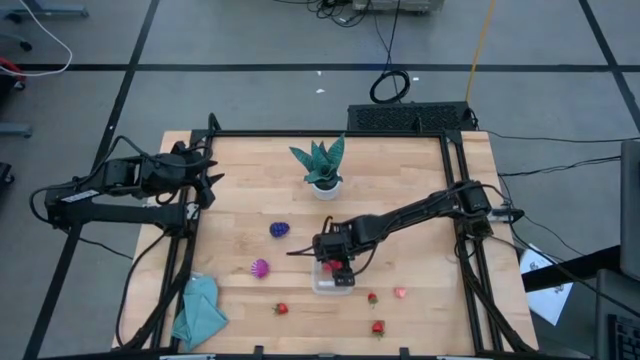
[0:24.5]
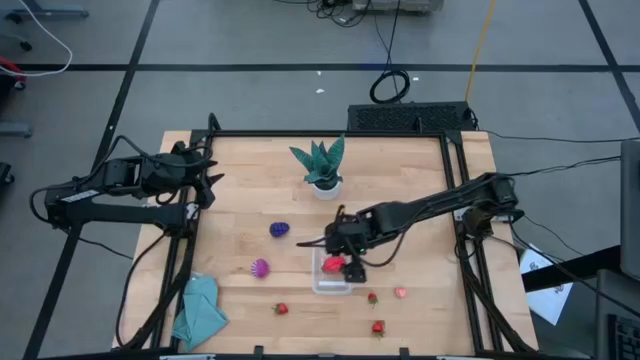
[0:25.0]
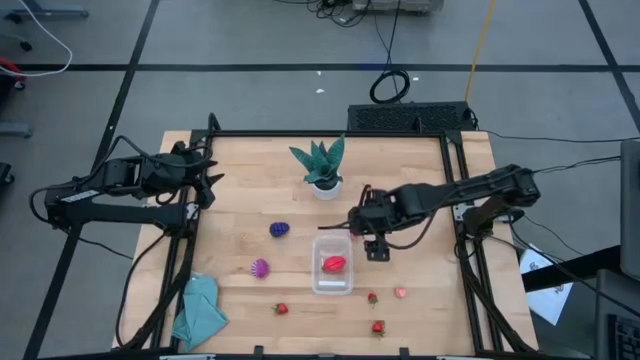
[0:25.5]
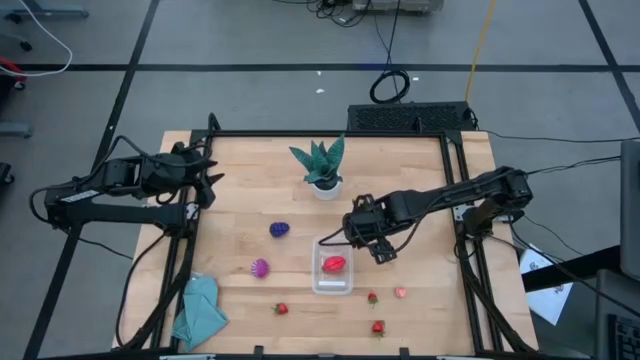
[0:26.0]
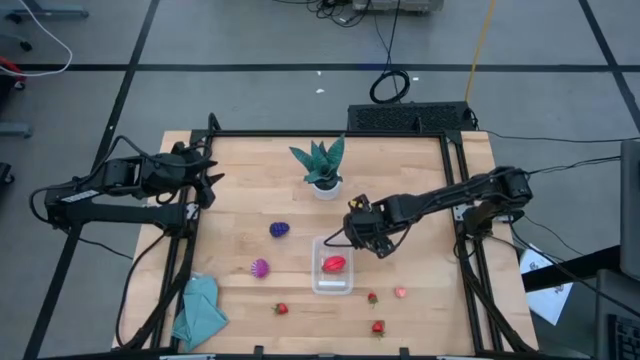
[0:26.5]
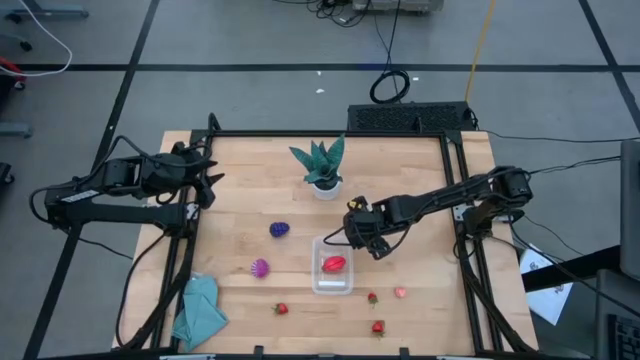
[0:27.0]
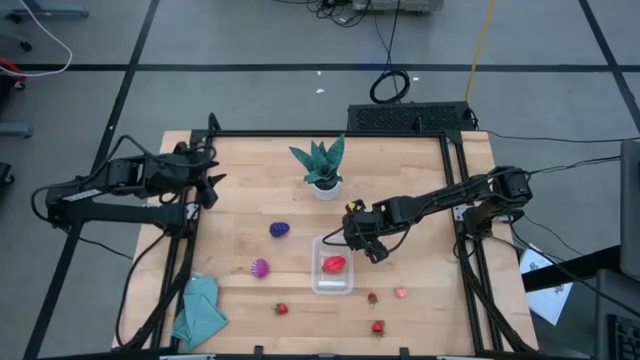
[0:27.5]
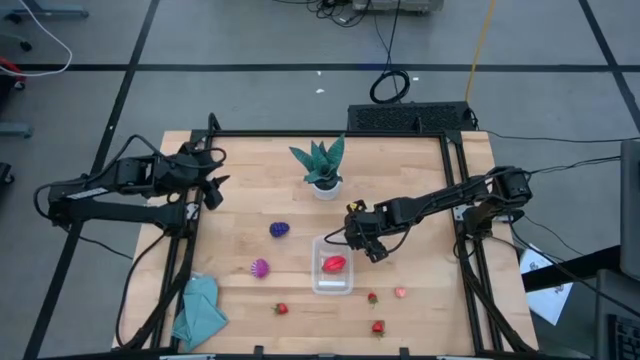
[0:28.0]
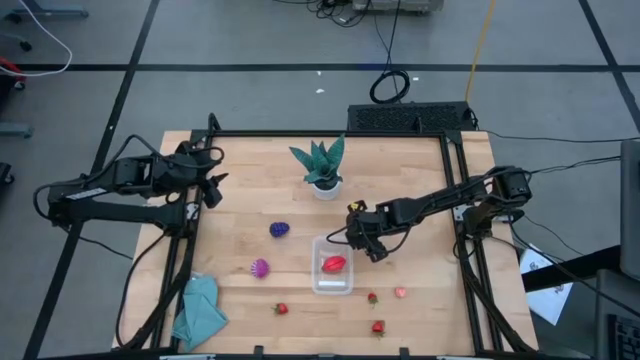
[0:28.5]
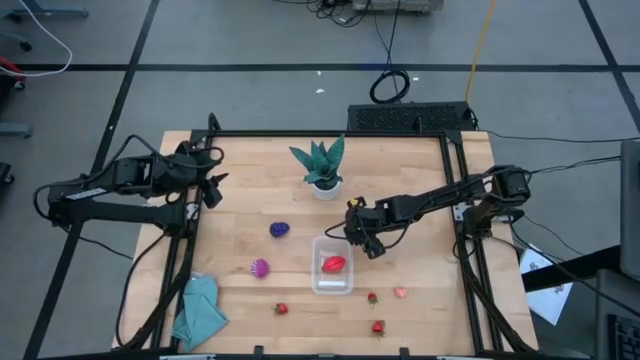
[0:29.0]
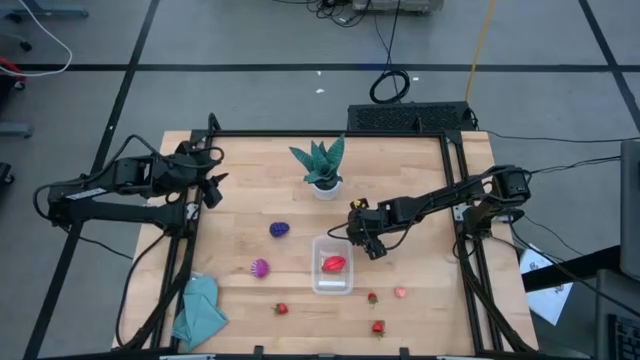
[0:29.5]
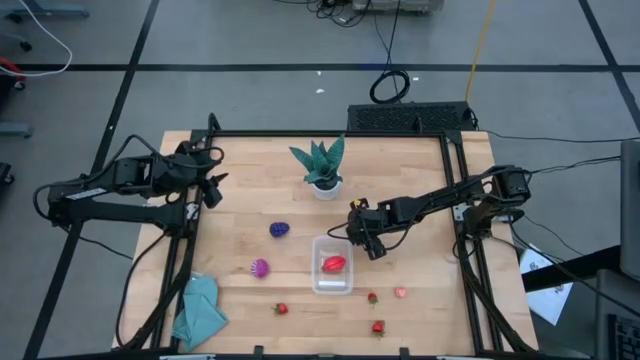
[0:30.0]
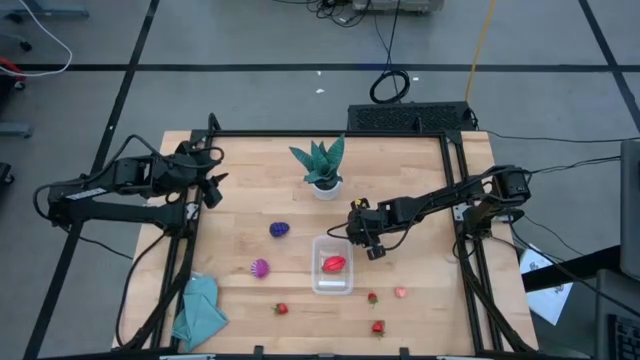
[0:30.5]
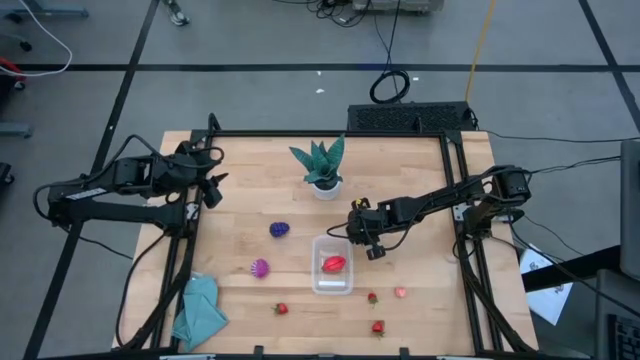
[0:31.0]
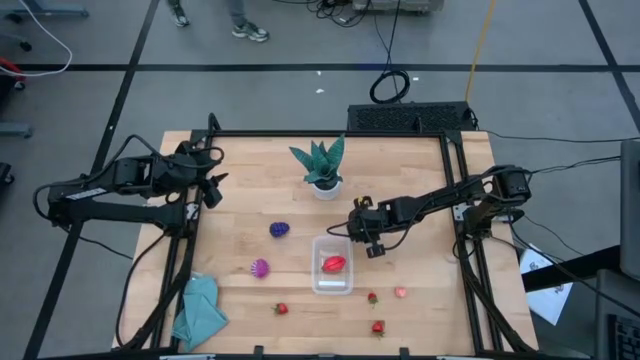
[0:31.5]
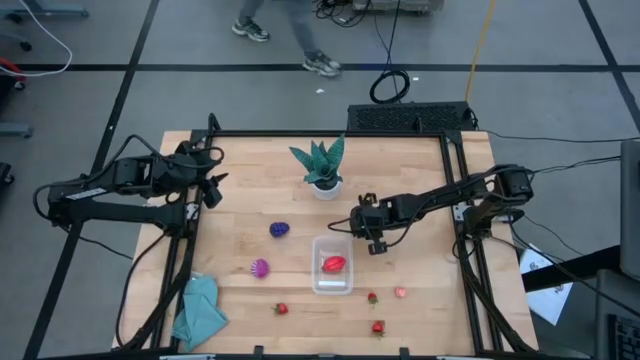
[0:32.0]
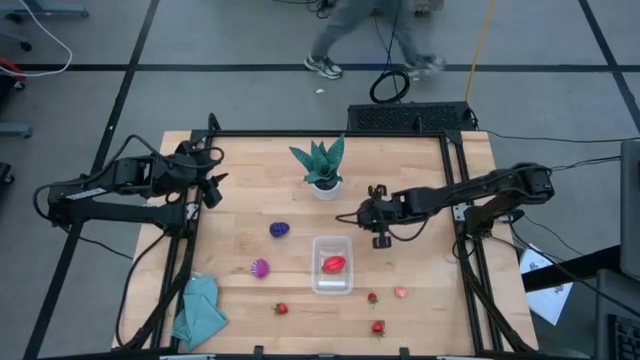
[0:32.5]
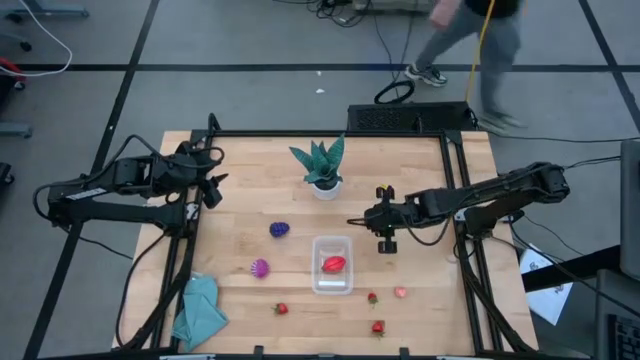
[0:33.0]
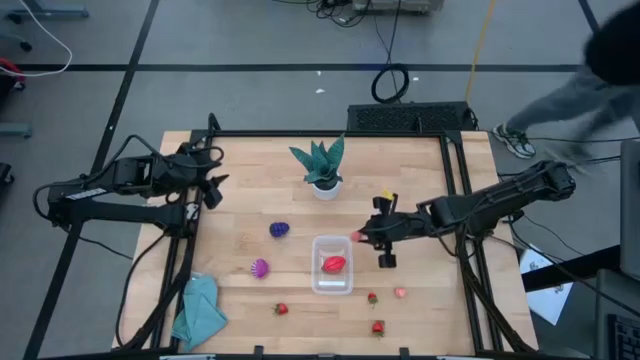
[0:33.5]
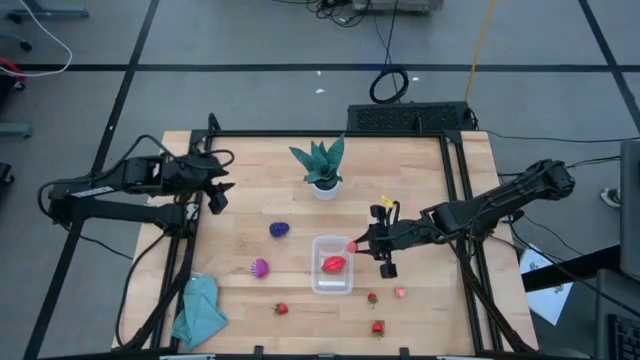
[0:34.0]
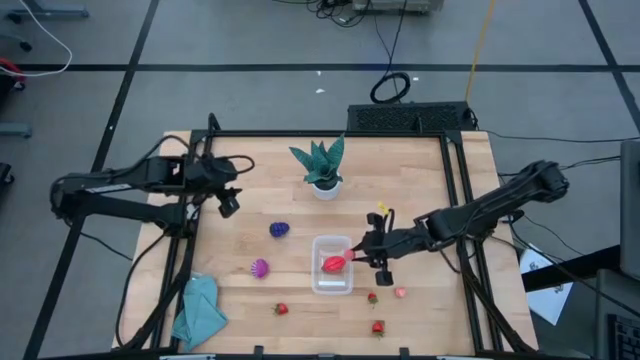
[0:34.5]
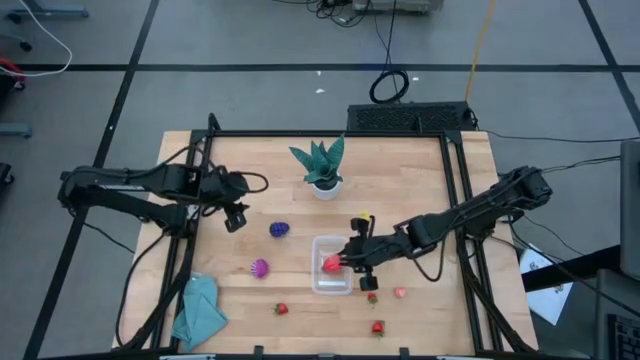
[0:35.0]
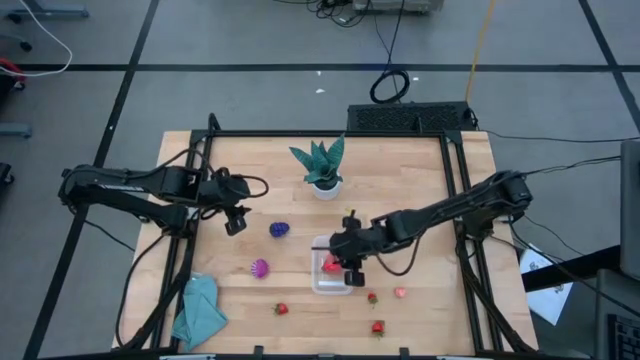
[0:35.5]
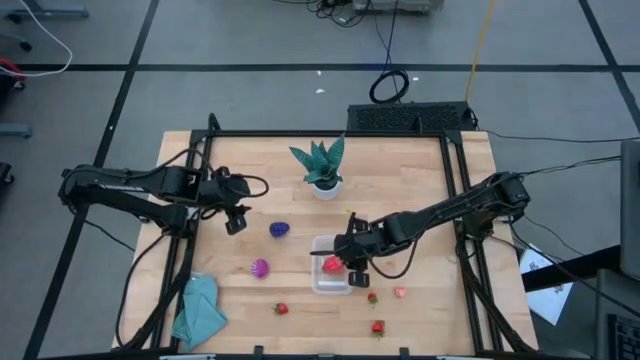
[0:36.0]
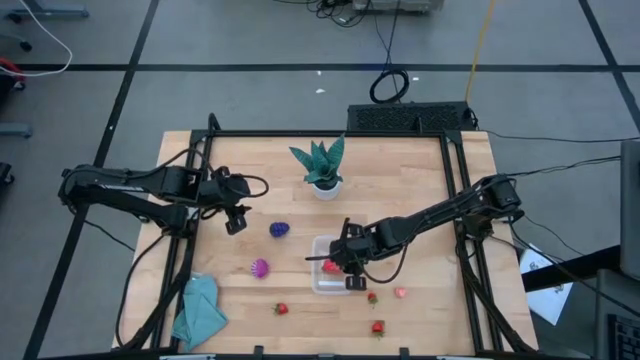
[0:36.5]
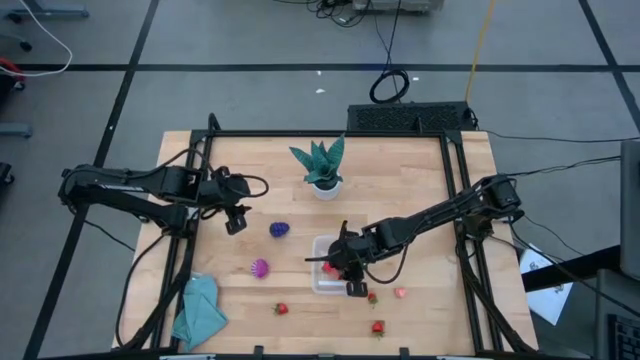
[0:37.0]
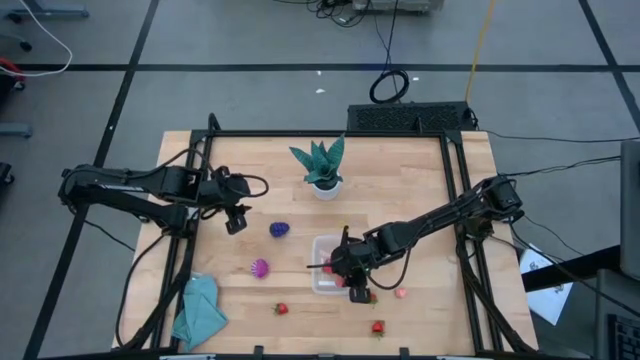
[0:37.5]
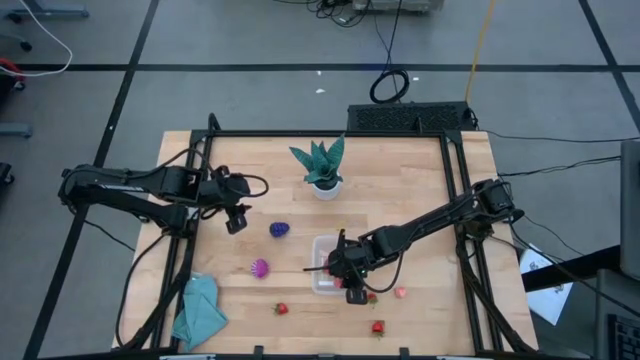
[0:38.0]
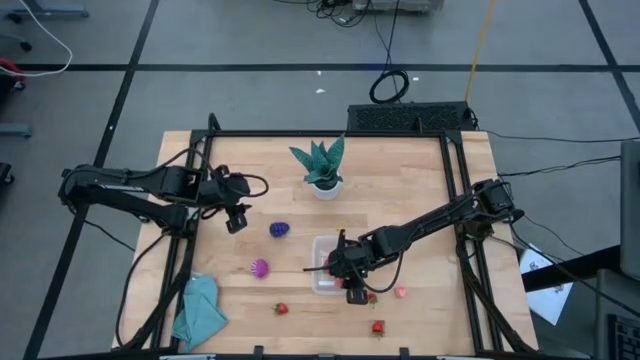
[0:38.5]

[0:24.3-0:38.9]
Task: Pick and placing Produce into tupperware
Put the top pink peach into the transparent bin

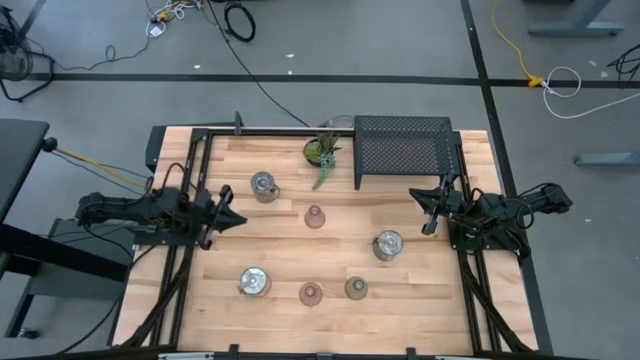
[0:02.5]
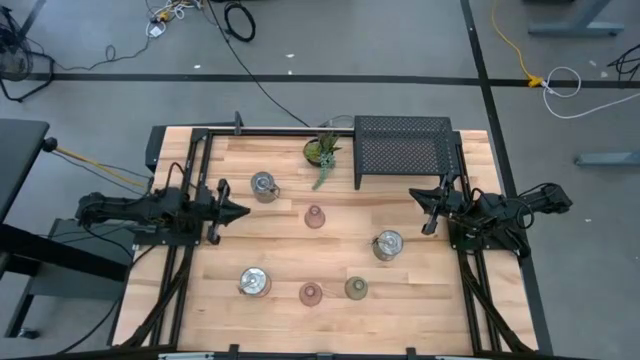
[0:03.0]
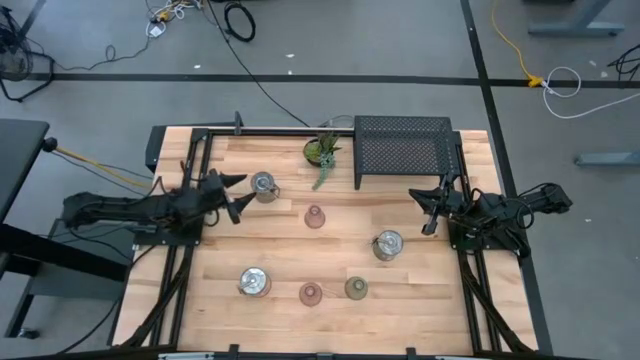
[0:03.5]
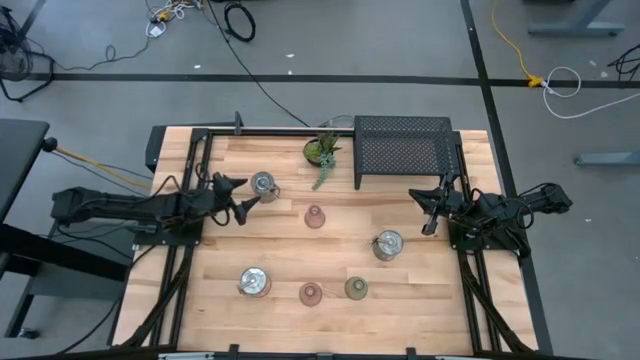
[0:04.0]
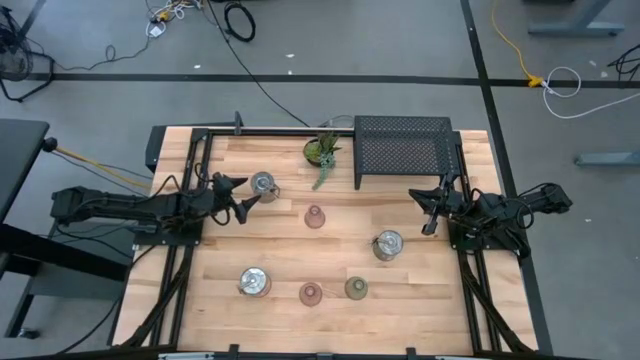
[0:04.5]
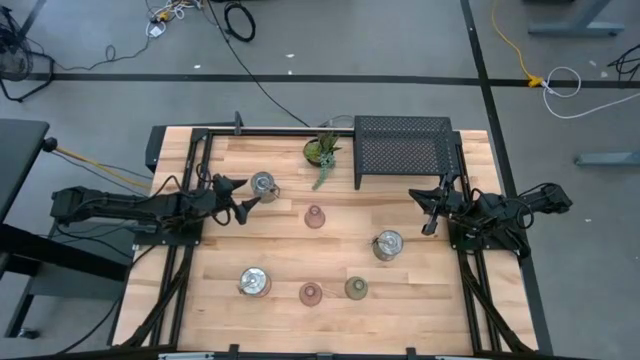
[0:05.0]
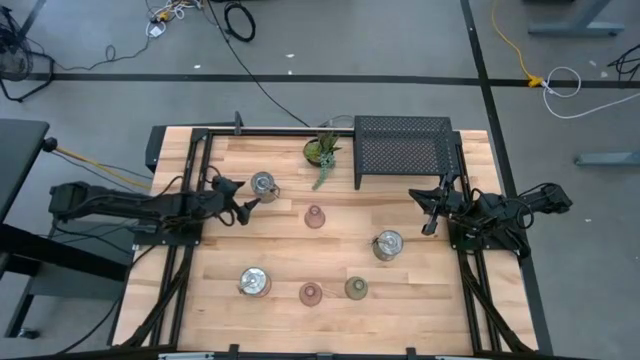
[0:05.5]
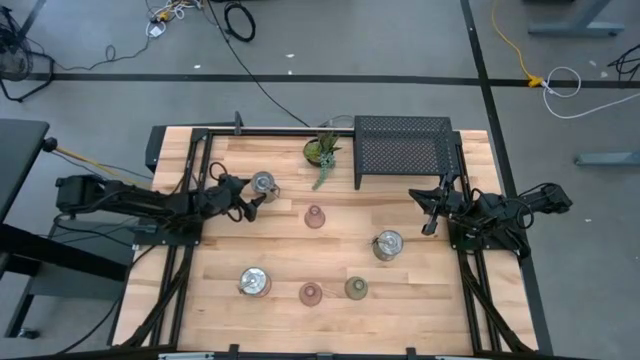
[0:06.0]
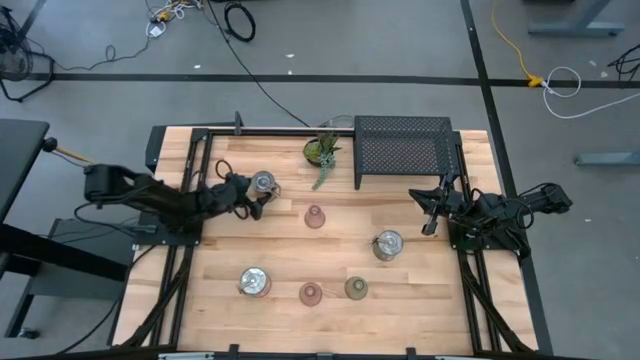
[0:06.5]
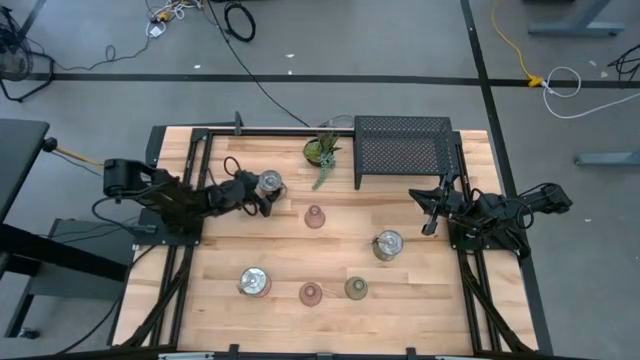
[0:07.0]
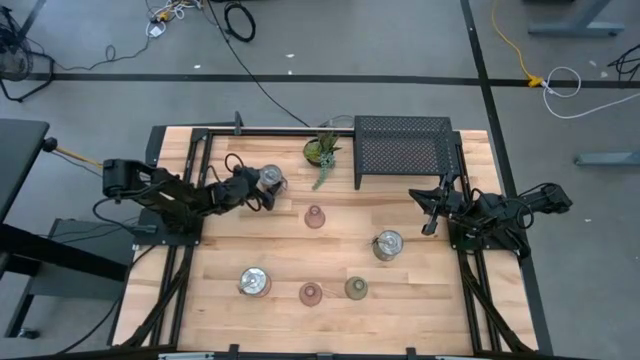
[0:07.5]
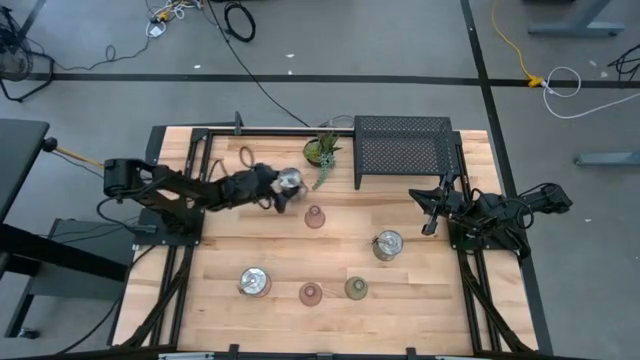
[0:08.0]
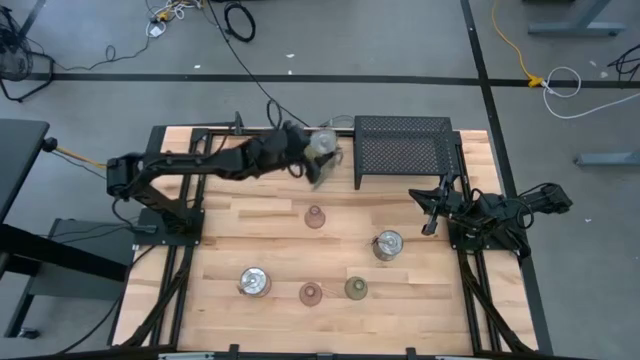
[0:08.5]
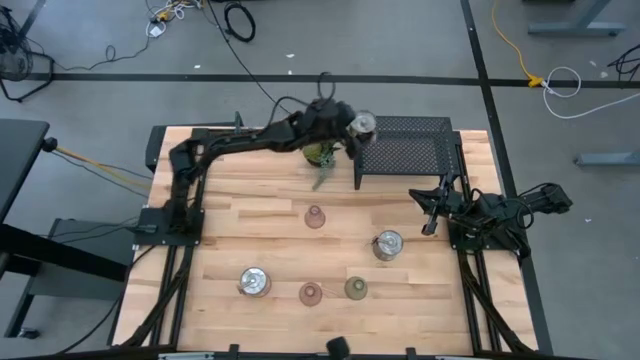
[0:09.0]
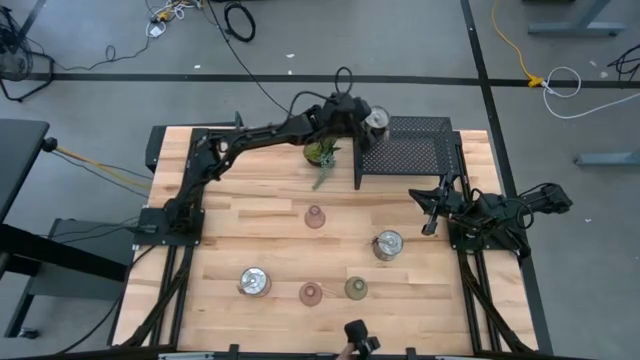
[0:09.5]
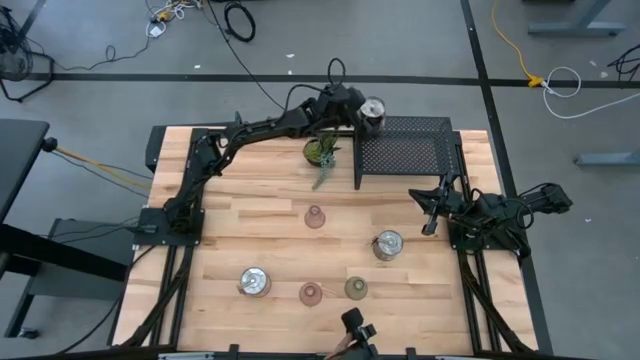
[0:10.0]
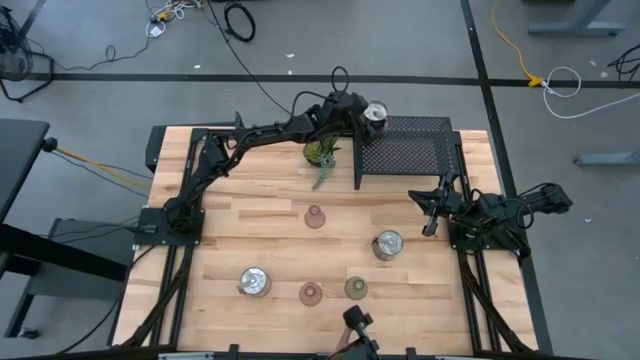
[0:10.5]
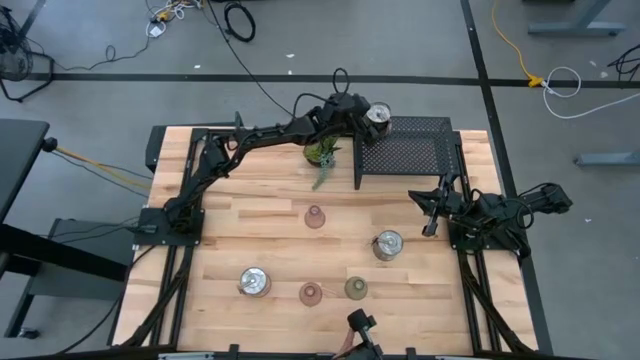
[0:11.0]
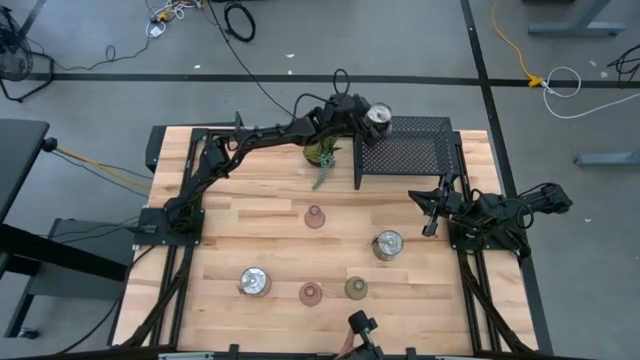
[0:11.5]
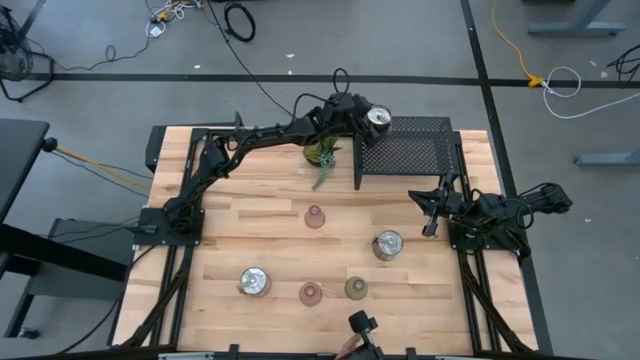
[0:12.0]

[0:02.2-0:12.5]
Task: Pick & Place candle stick holders
Put the top left silver scented candle on the shelf
